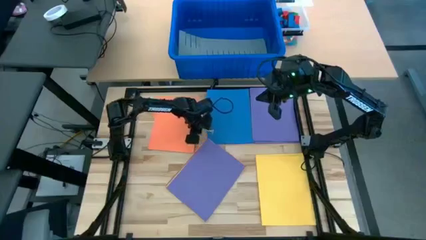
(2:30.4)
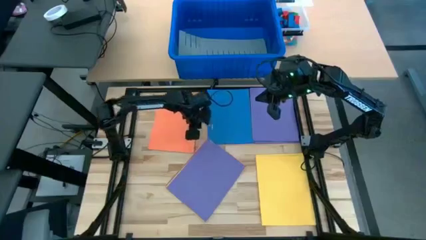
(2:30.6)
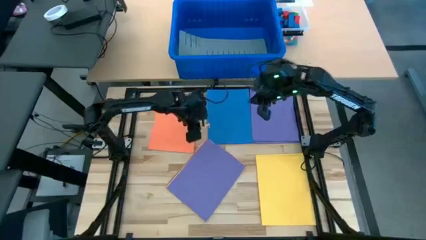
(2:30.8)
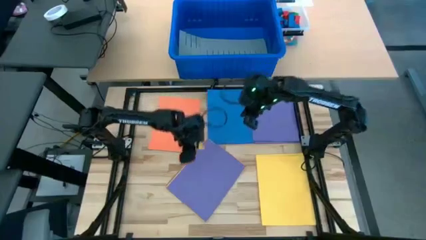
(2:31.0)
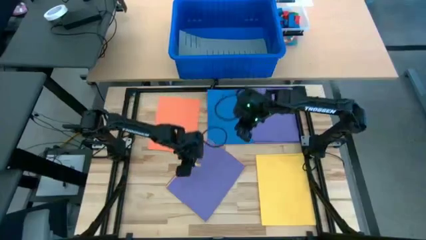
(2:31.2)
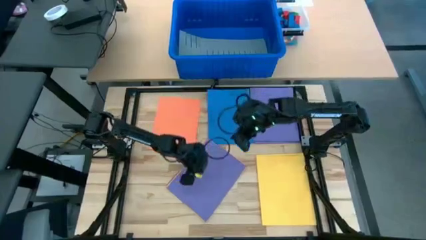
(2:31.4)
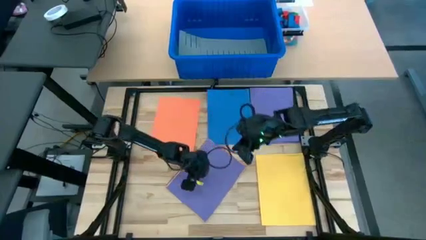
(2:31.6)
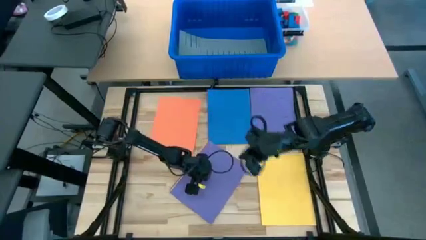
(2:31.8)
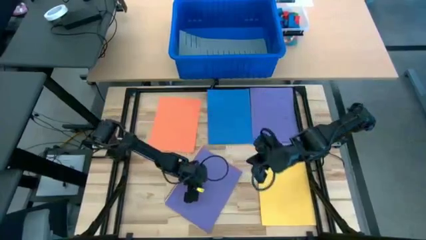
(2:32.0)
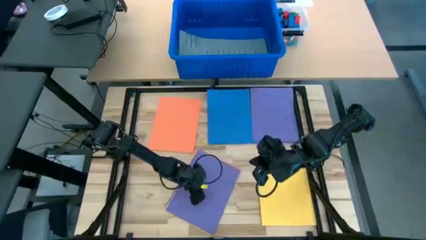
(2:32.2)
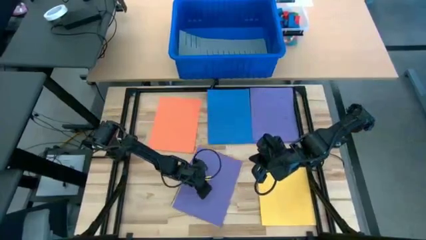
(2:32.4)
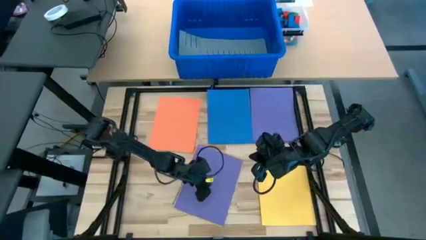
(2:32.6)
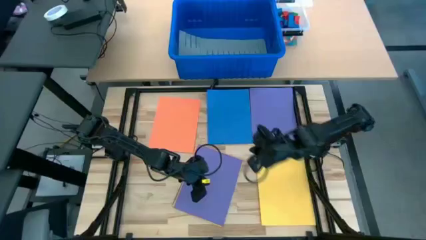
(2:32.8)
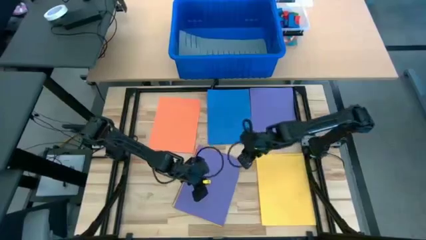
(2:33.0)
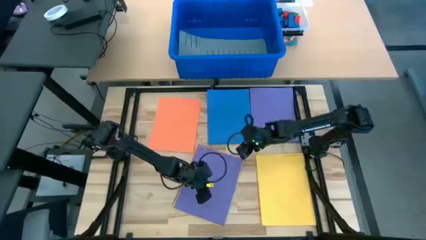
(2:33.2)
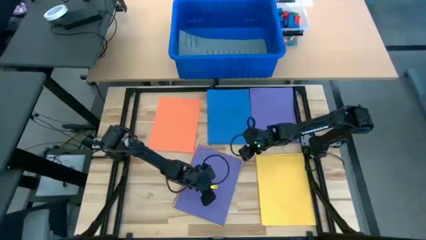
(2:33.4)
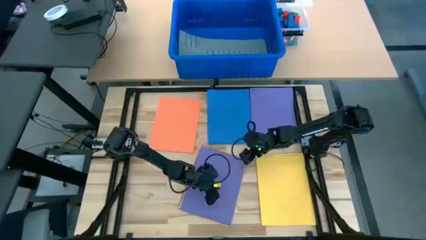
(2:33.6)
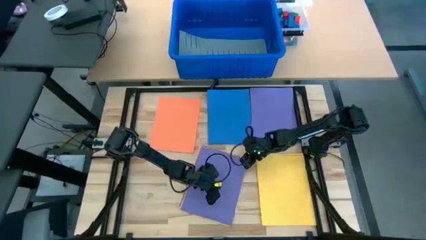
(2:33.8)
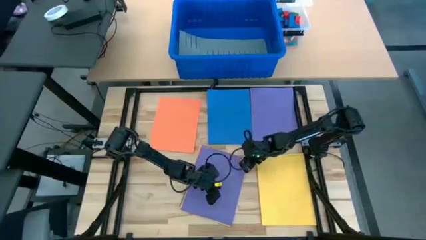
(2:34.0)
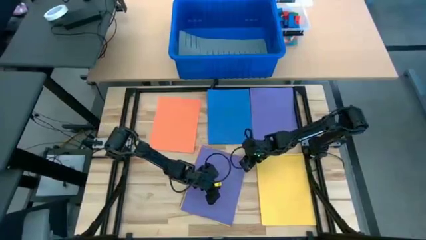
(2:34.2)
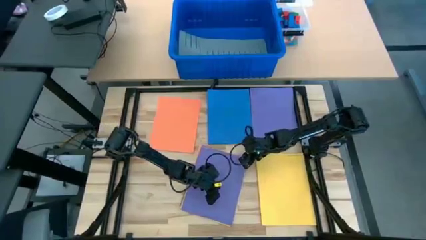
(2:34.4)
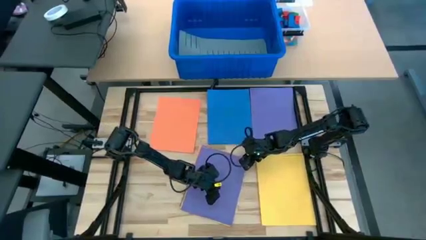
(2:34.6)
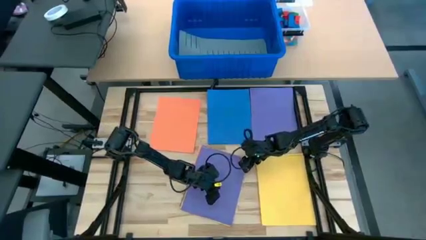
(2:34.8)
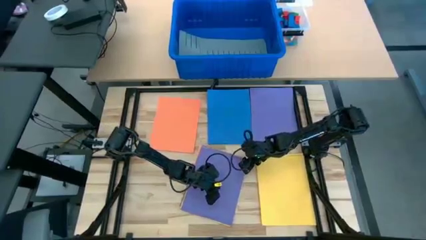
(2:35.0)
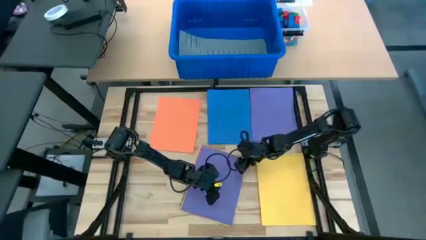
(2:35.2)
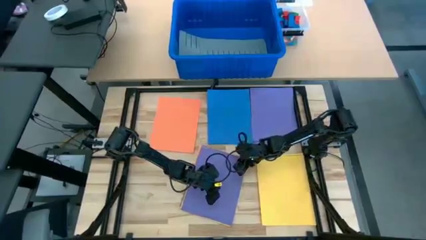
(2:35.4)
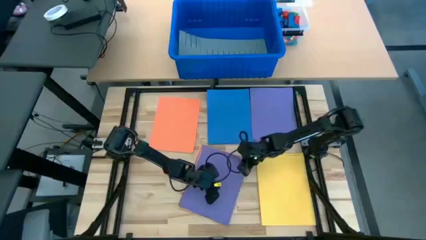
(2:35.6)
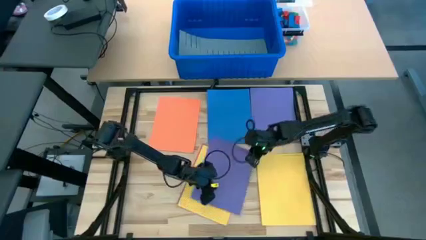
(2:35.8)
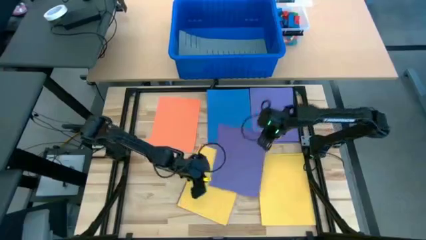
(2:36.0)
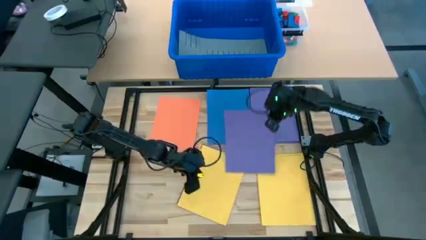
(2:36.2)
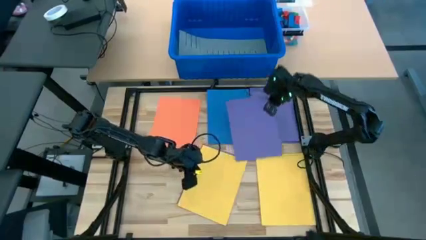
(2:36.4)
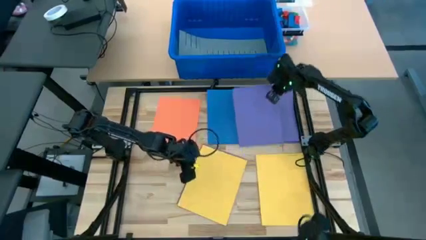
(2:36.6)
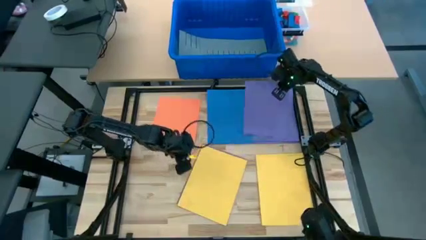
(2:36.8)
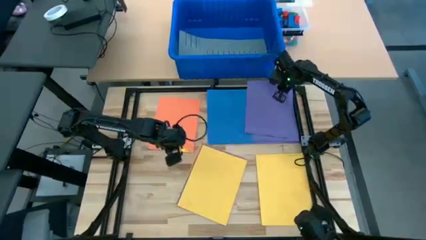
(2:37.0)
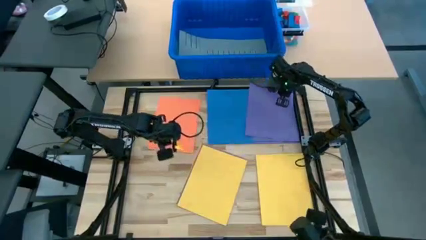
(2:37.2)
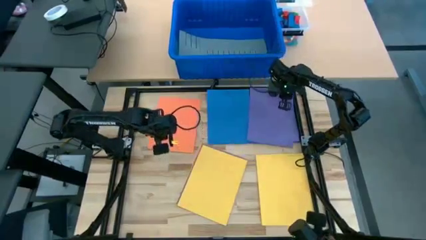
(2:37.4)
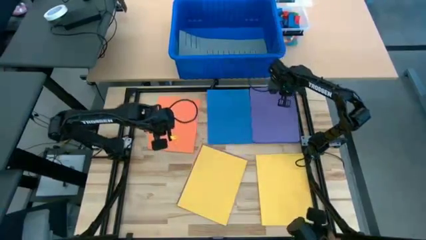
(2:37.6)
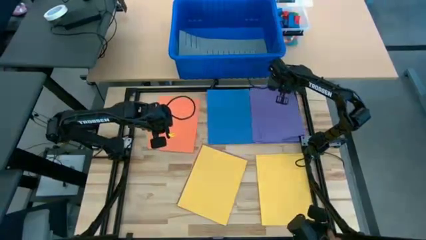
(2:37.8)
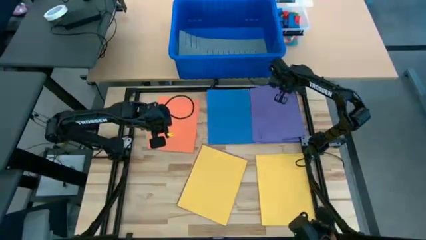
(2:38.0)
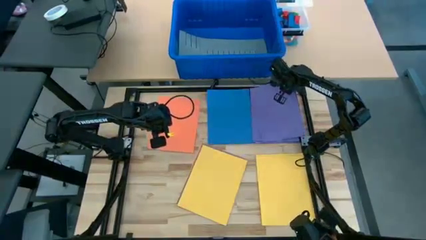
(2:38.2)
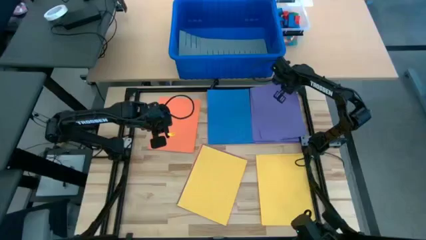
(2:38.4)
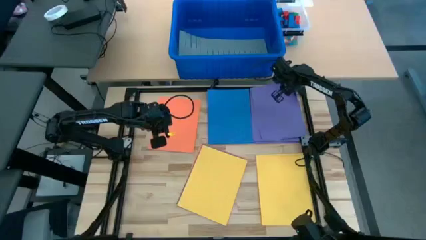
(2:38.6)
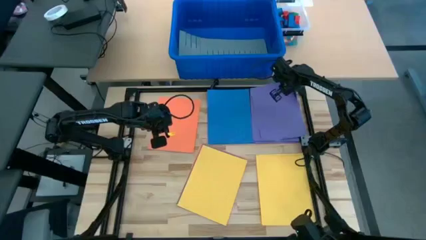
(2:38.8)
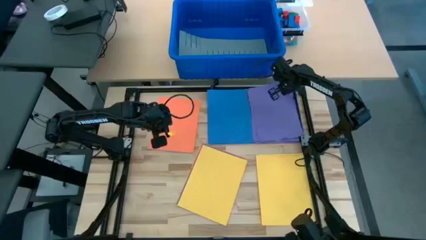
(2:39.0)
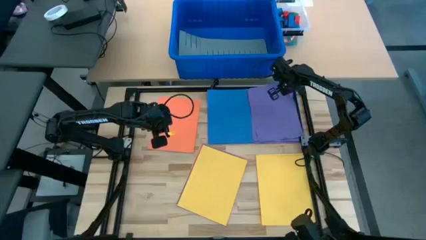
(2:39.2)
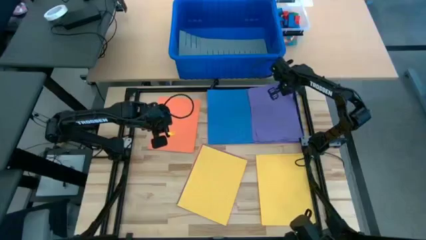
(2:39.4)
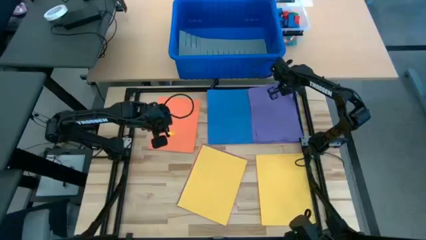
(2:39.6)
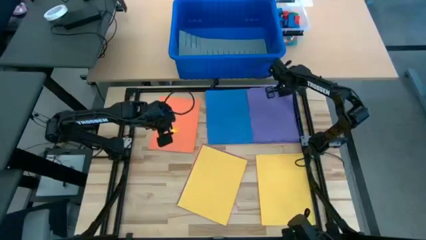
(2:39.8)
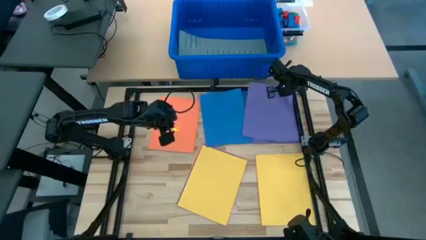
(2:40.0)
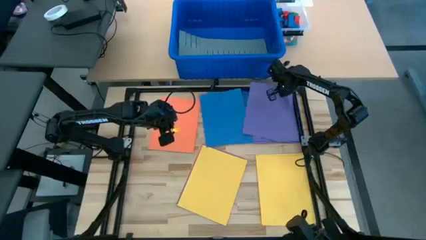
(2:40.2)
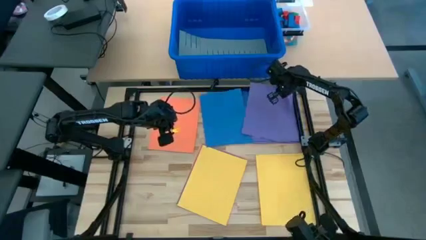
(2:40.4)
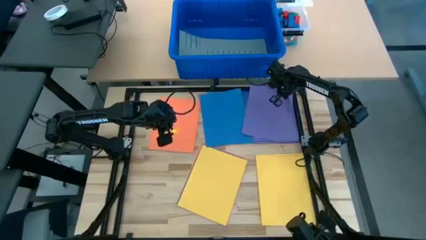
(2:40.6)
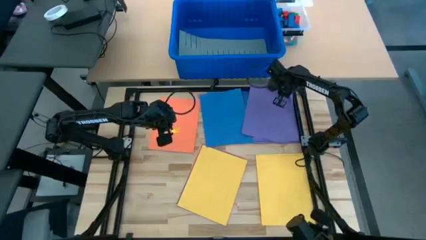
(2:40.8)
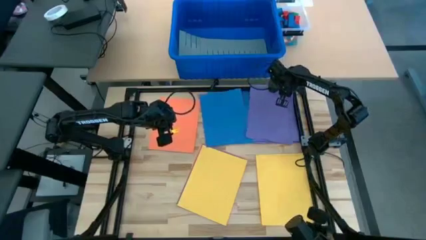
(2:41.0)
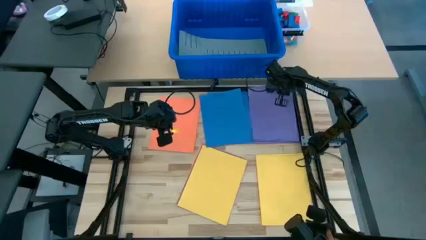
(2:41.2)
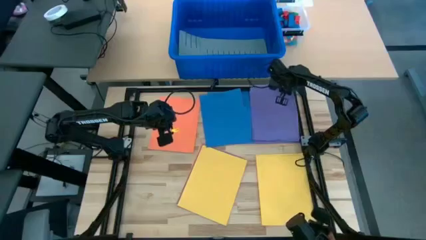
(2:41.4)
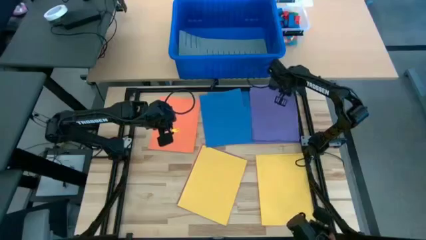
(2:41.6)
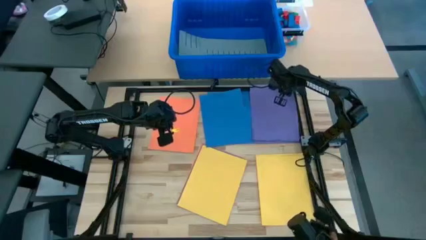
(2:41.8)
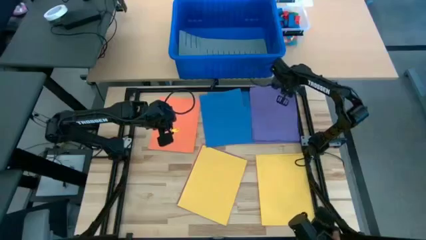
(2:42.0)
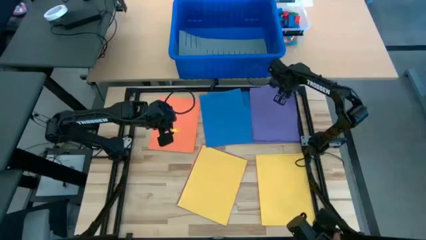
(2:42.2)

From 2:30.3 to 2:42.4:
Task: Organize paper
Stack the purple paper on top of the other purple papers

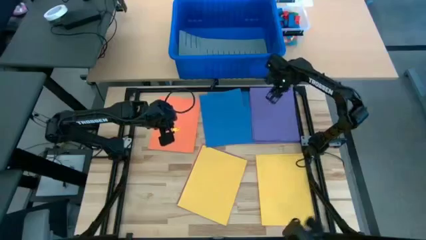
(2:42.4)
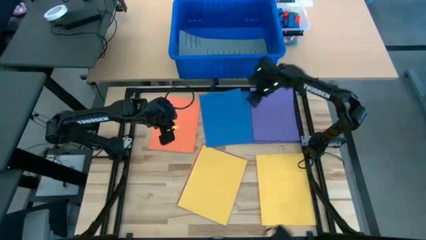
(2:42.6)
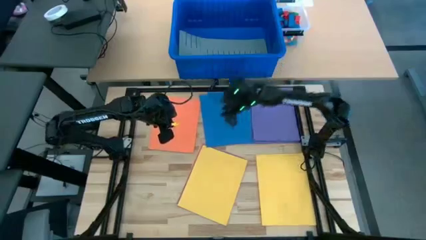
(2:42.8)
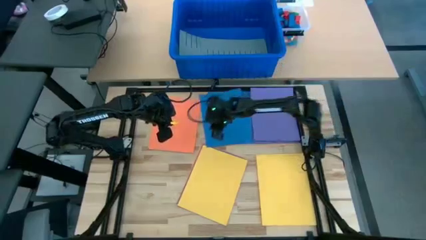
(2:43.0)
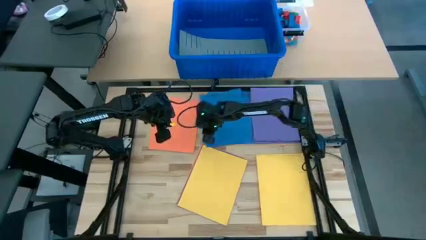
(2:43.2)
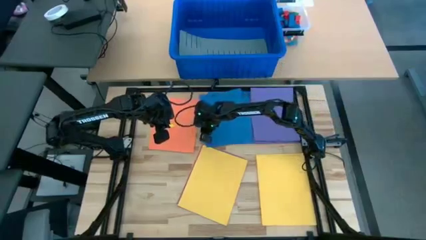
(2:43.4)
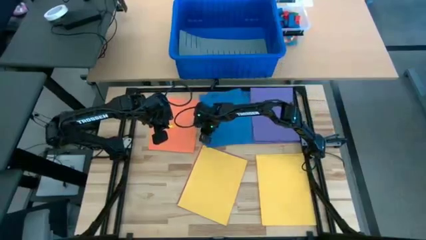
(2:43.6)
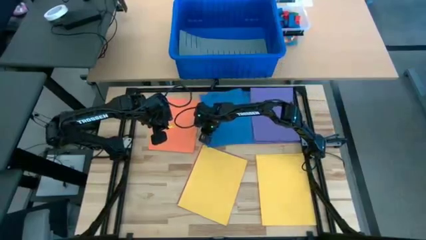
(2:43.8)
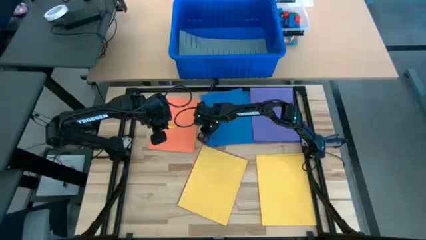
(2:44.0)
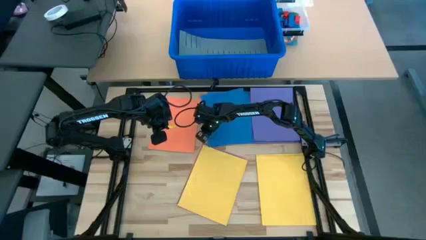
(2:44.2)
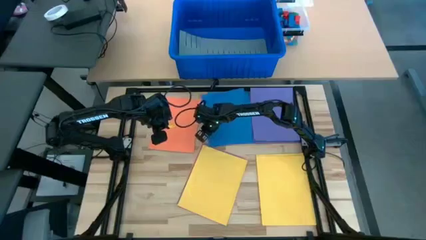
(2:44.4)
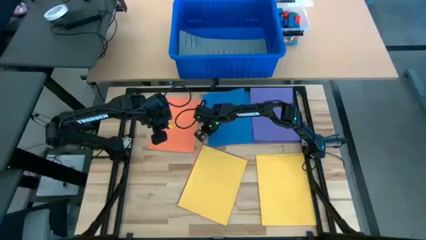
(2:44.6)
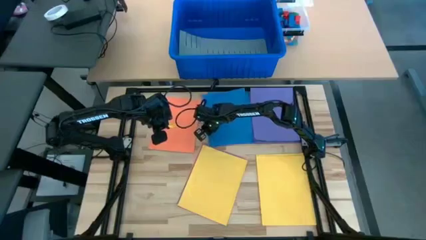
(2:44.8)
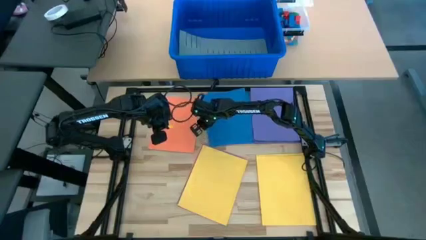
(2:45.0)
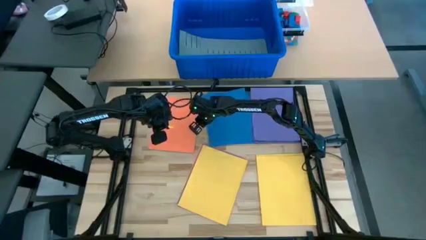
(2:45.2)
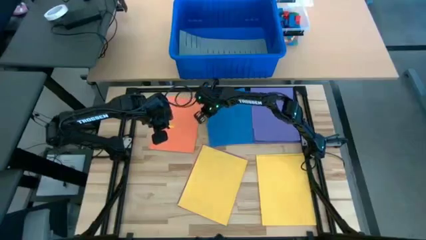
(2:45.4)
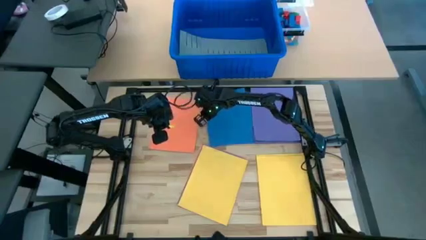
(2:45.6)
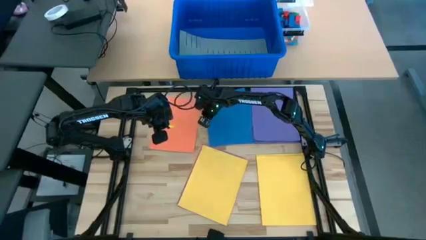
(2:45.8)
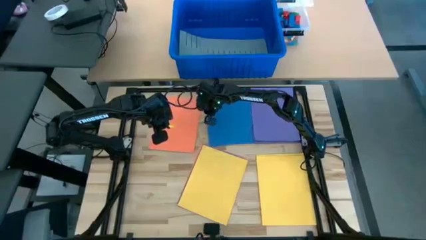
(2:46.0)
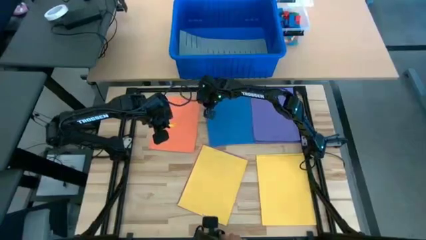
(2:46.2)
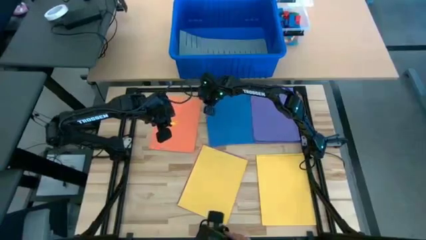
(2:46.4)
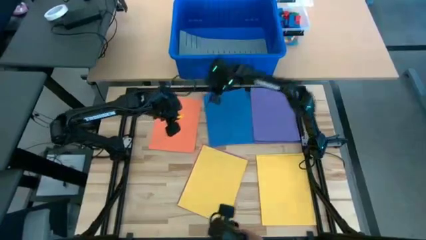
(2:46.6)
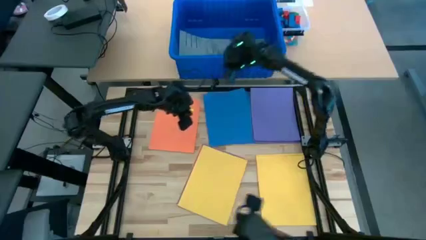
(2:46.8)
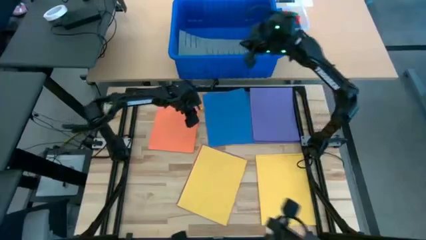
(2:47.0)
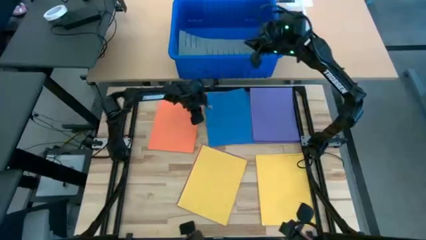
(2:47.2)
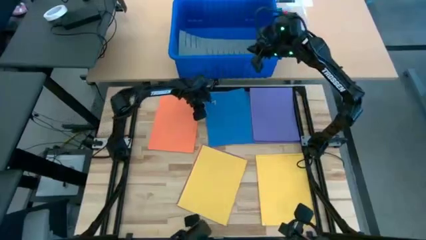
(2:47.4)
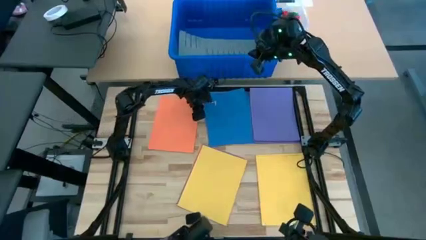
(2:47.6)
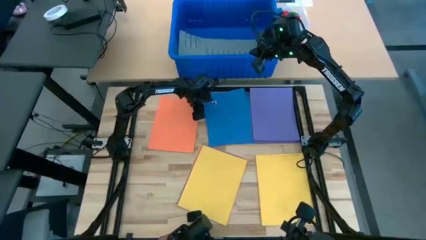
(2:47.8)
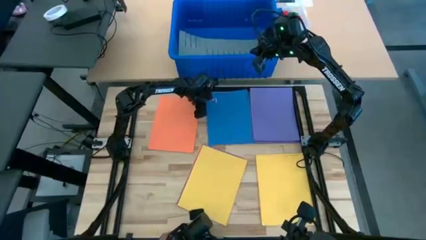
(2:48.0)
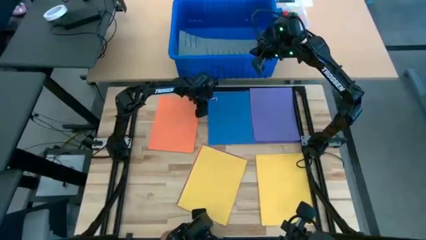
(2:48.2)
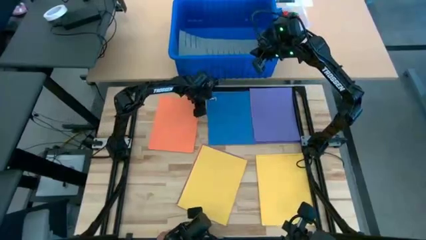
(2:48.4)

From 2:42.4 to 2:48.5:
Adjust the blue paper on the table
